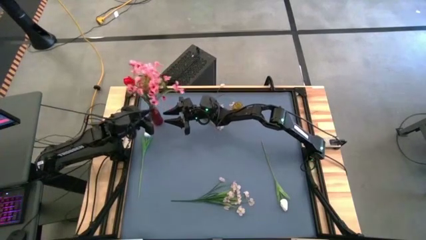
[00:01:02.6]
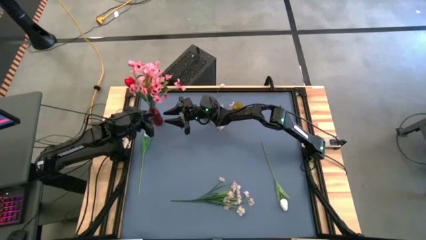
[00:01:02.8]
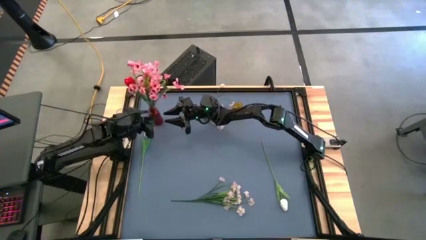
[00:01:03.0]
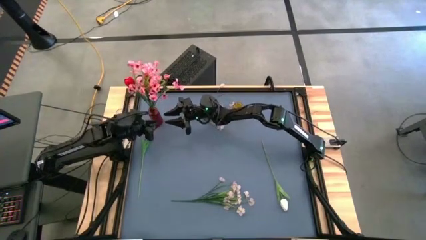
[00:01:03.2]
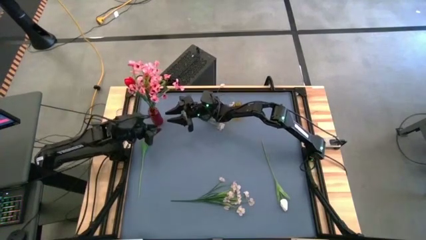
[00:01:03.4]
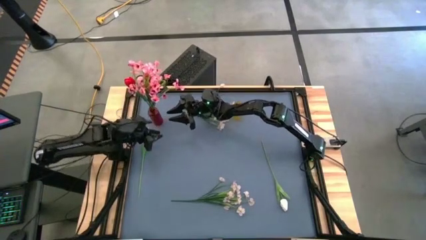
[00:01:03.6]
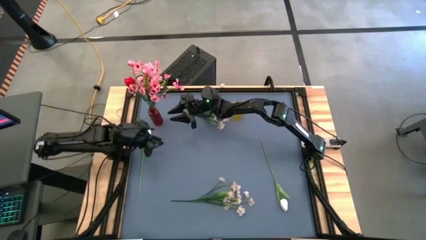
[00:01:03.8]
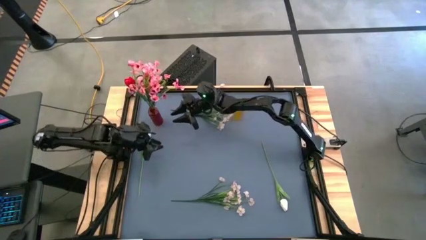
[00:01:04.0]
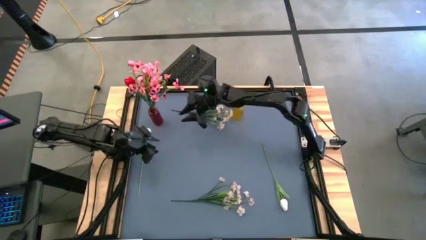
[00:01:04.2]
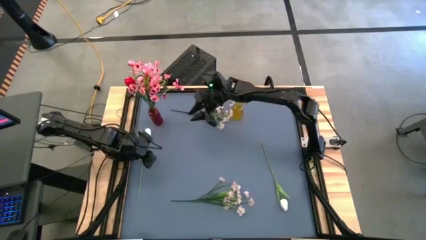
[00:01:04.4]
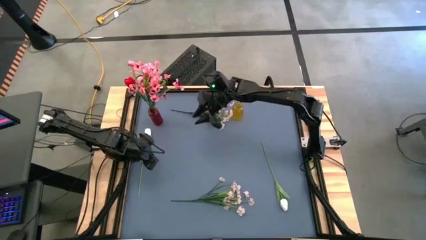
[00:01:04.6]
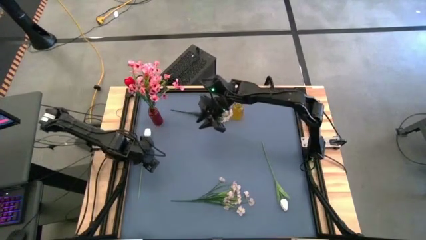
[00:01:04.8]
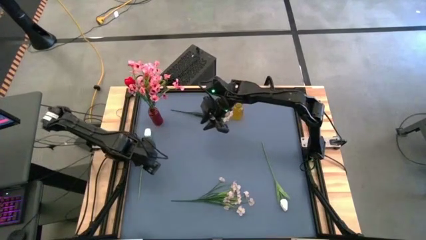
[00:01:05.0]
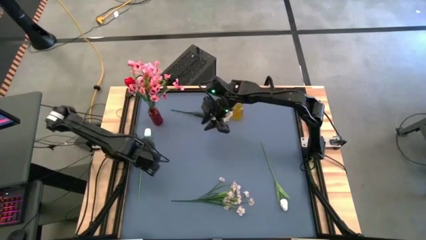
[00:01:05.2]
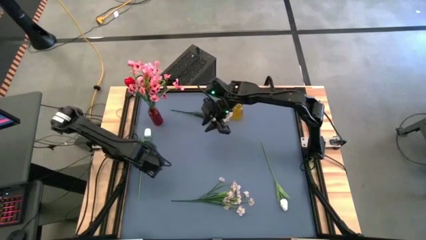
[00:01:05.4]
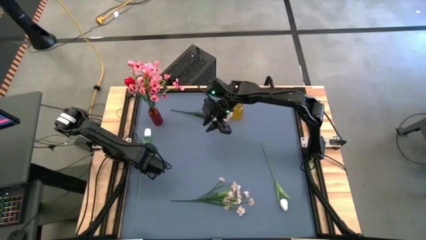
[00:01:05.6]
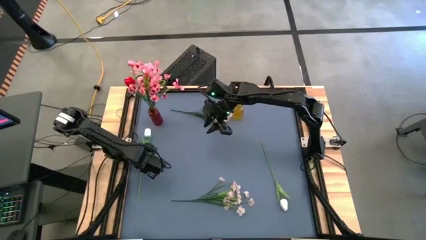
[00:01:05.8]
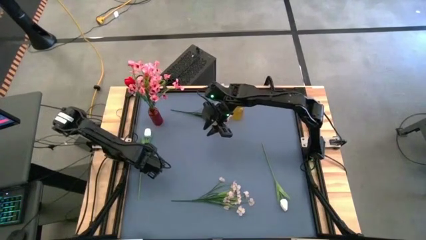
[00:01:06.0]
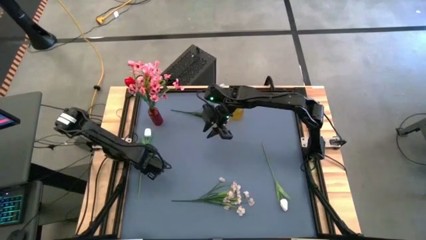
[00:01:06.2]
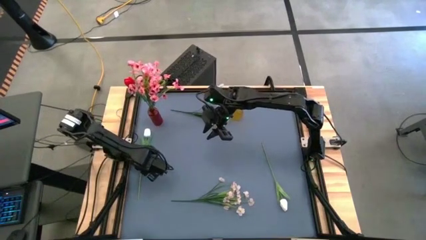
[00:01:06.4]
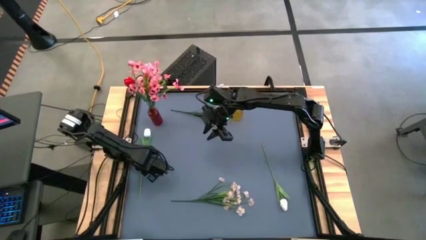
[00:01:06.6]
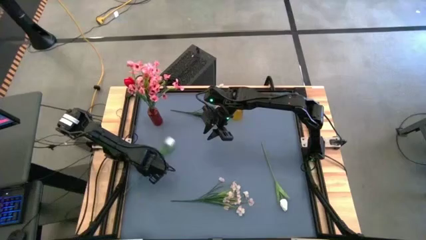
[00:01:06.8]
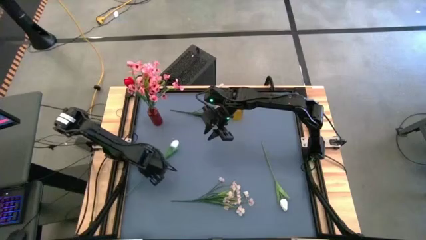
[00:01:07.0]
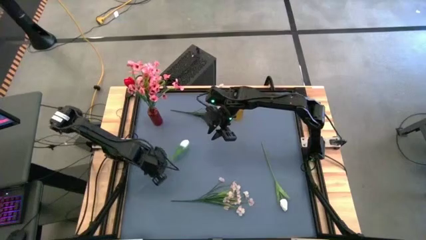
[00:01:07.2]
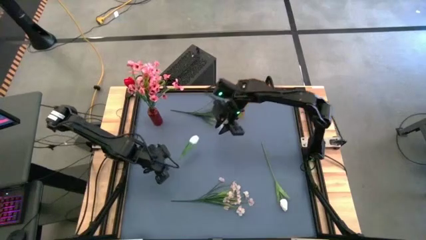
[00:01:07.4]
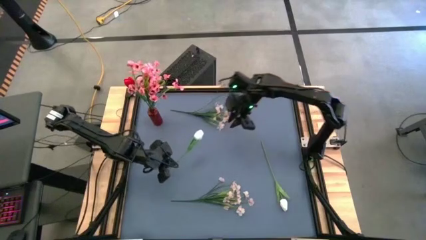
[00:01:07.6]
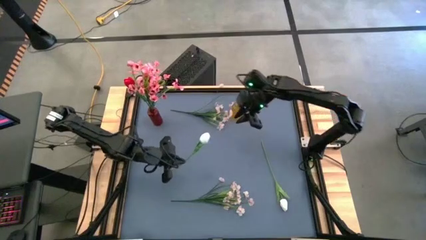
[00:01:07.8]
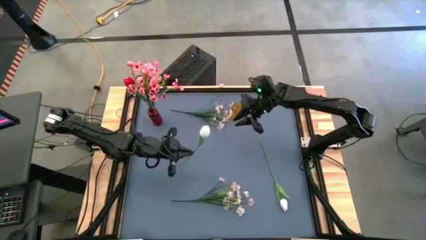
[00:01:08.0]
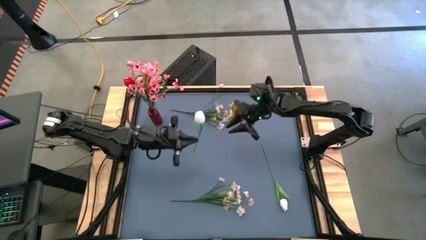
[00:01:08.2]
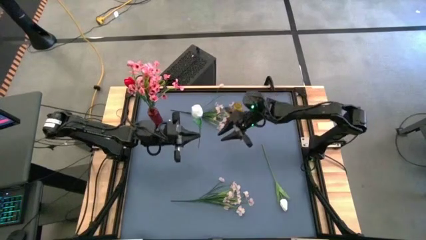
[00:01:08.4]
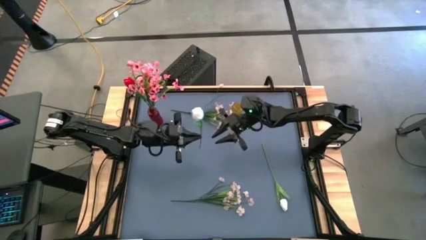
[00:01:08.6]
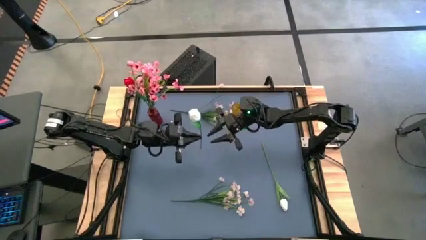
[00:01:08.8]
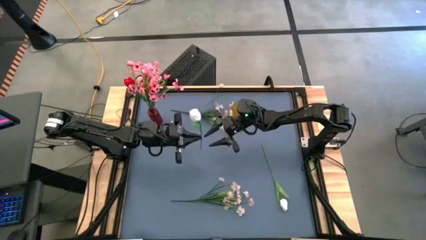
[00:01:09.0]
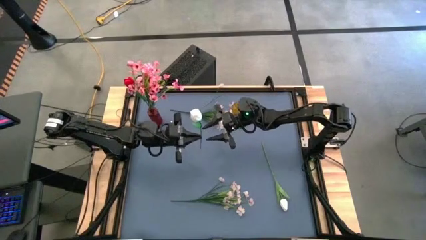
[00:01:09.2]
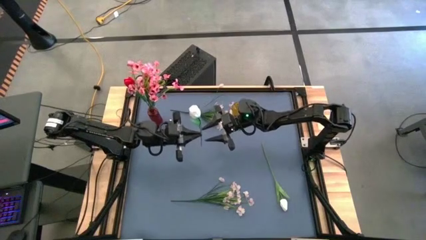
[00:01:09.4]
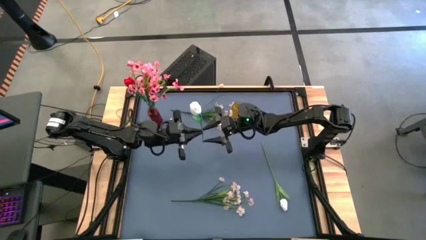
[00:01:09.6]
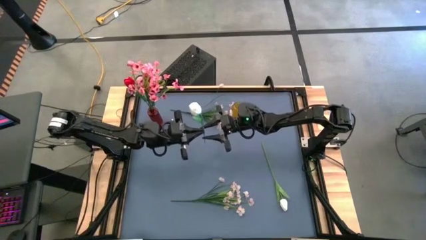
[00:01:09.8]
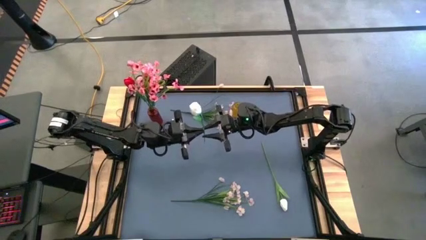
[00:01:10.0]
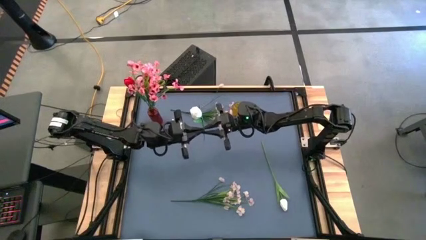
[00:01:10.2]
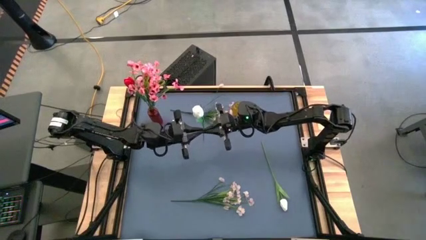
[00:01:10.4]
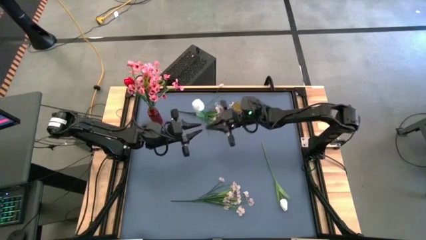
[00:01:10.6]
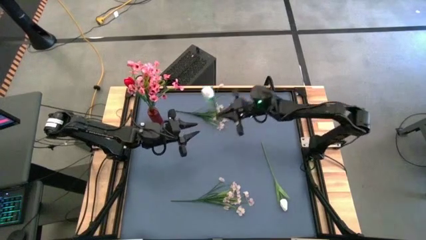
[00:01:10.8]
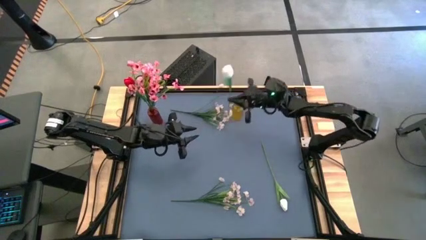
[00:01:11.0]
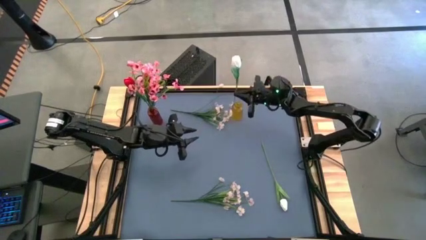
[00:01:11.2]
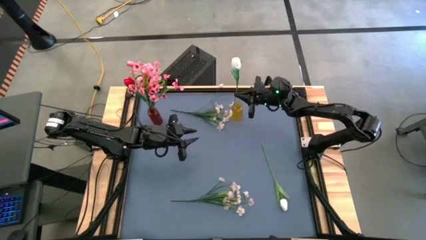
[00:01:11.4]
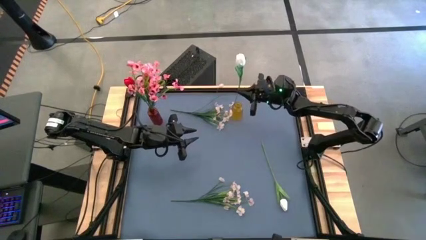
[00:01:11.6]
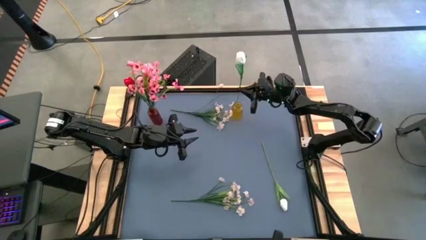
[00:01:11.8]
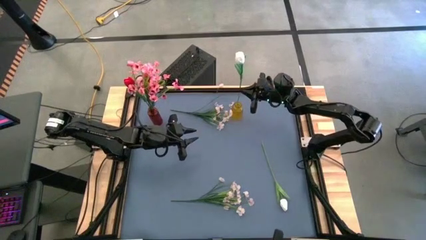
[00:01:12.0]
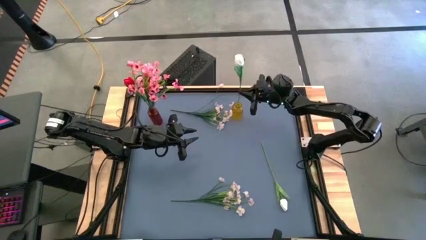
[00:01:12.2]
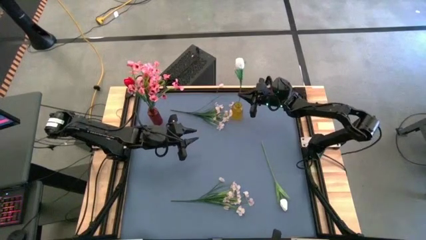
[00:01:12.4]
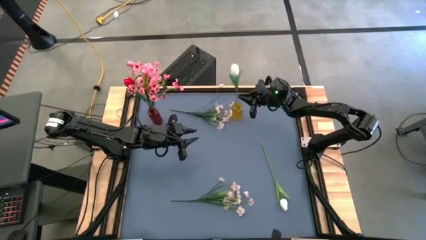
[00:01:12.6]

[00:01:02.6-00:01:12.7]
Task: Sort flowers into vase by color
Put the left white flower into the yellow vase

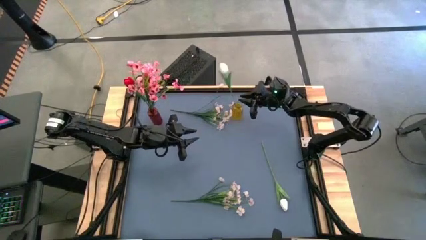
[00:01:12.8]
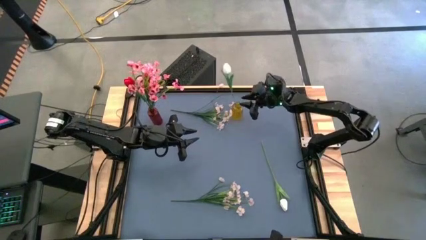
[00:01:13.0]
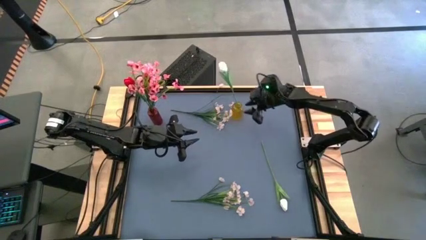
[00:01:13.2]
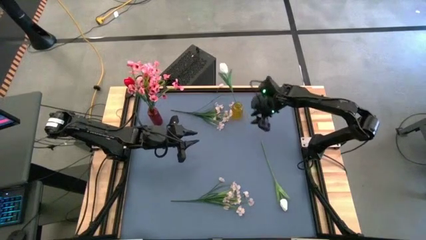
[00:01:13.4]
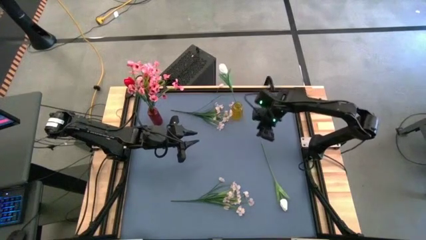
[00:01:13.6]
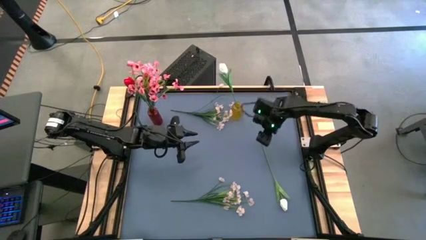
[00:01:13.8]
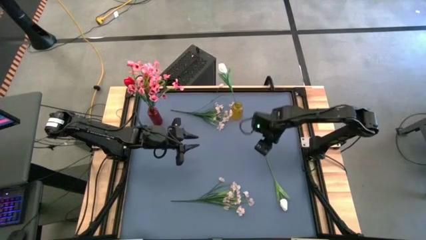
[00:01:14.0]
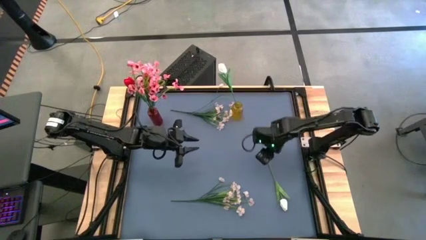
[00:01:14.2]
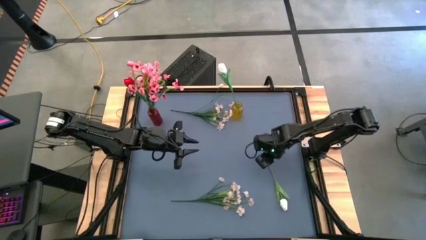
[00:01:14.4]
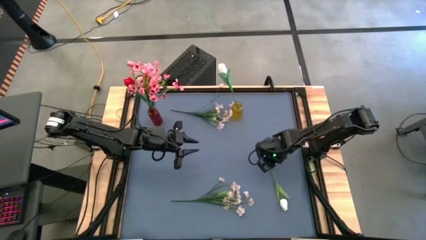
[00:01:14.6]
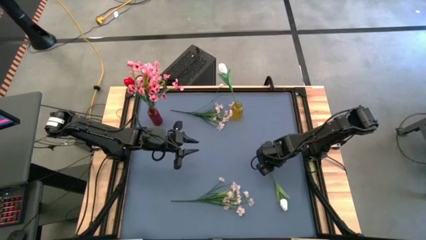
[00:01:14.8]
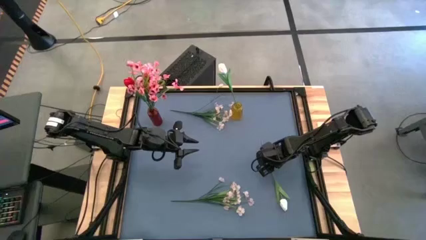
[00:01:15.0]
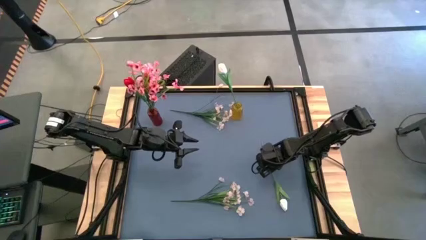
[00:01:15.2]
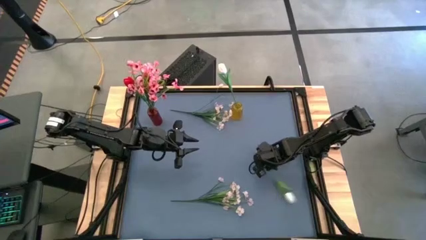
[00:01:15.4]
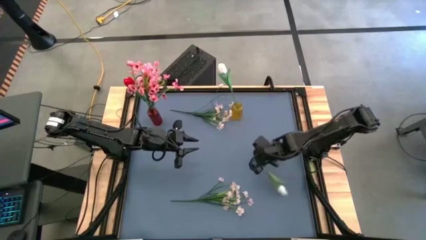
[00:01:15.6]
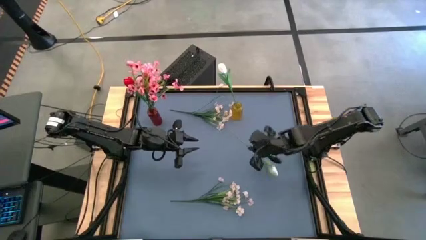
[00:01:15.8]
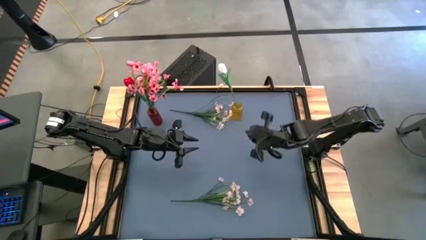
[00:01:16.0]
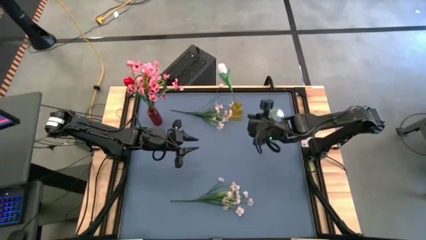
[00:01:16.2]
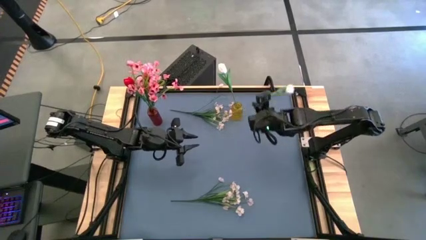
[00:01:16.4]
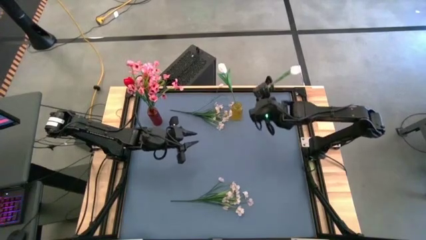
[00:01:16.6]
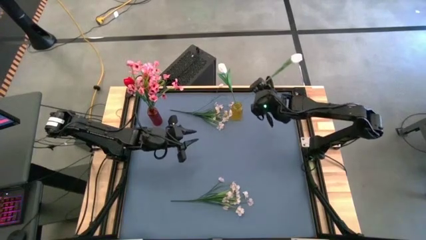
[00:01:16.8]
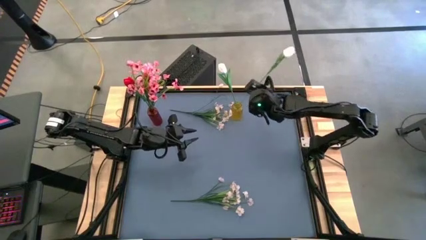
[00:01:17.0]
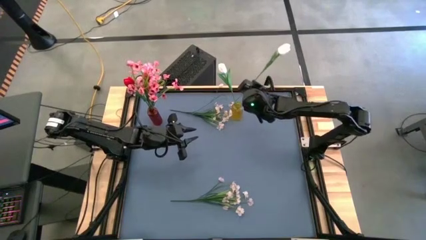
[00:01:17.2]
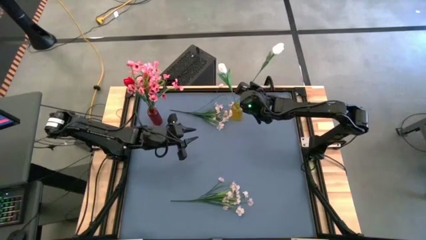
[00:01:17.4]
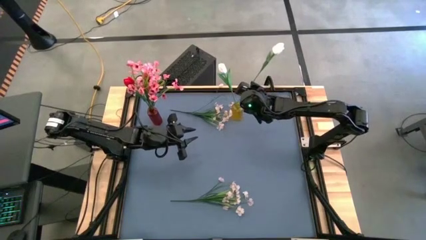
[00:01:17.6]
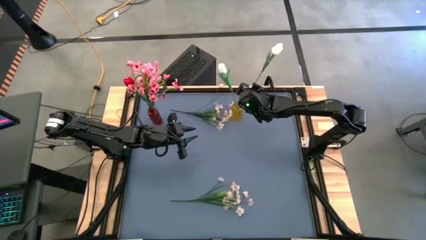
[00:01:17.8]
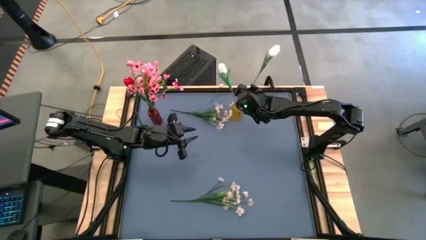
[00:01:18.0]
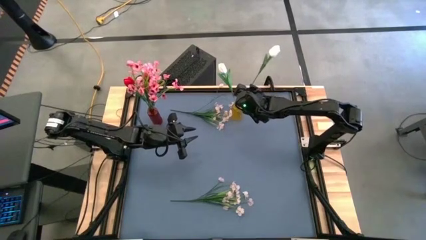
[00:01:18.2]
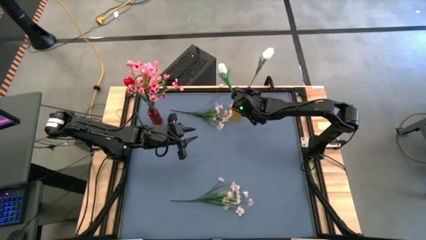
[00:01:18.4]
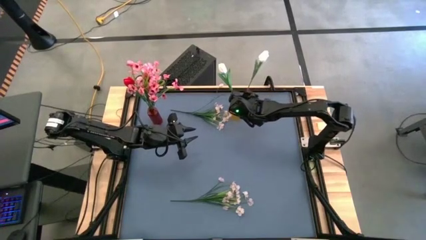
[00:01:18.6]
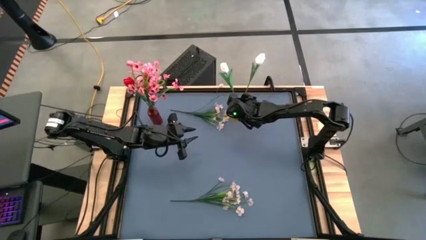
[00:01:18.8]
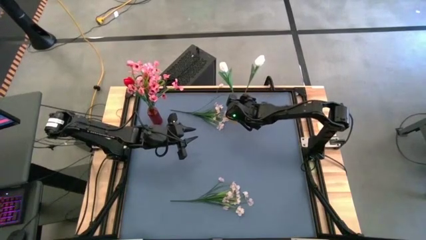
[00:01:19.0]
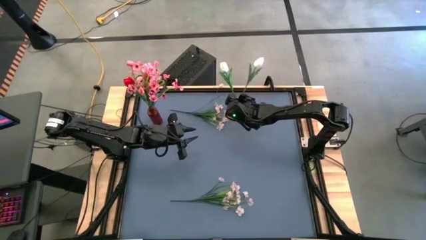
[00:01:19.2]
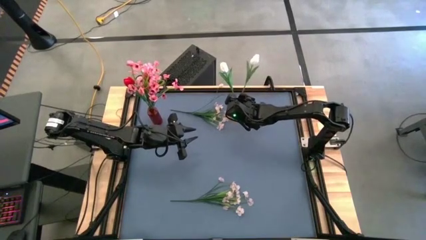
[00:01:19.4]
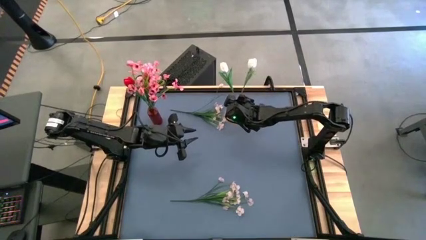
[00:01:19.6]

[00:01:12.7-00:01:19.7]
Put the white flower into the yellow vase
